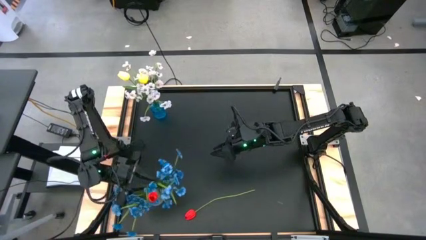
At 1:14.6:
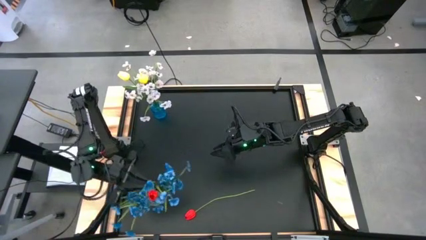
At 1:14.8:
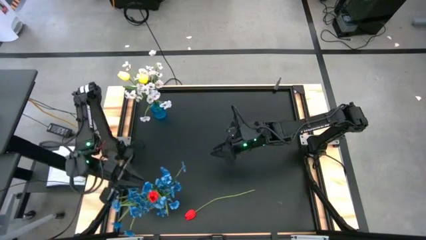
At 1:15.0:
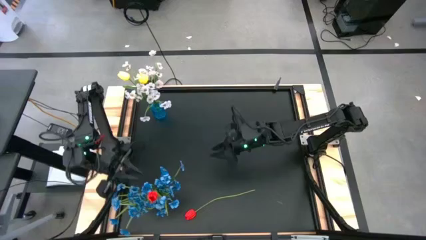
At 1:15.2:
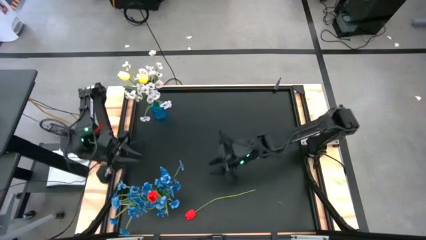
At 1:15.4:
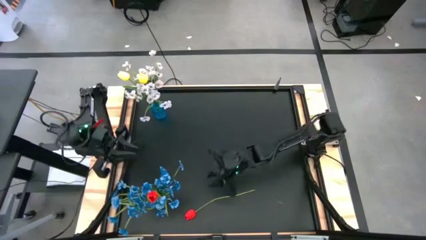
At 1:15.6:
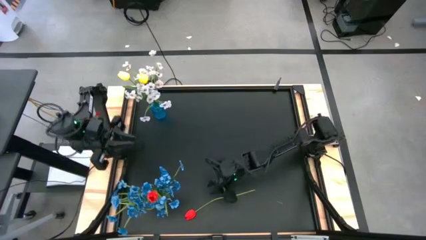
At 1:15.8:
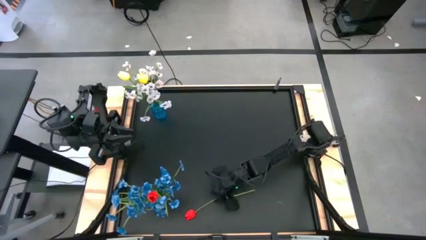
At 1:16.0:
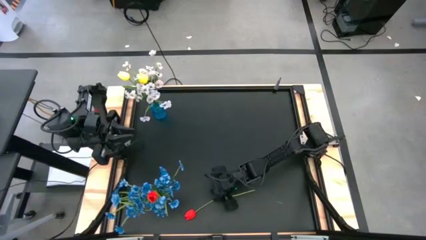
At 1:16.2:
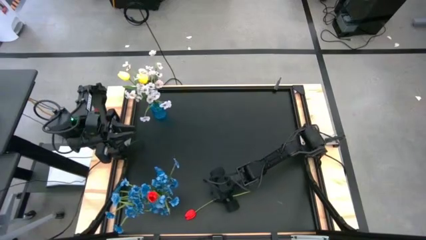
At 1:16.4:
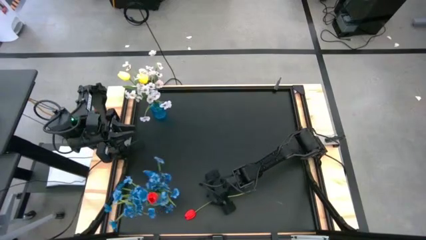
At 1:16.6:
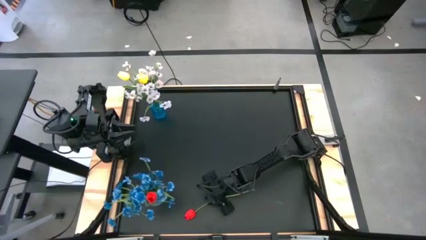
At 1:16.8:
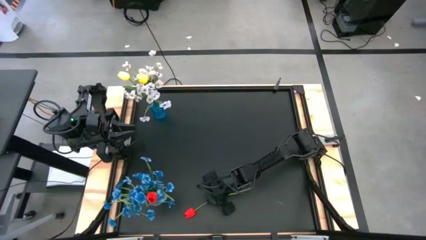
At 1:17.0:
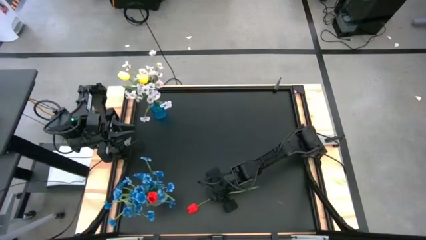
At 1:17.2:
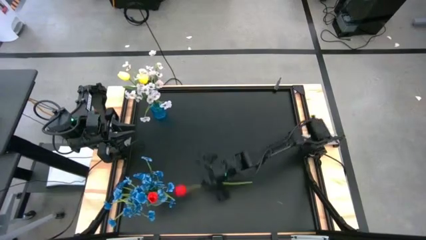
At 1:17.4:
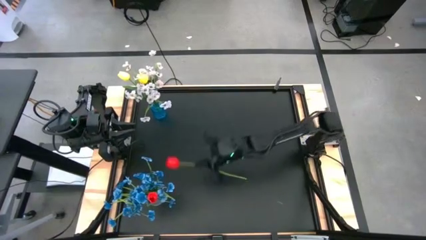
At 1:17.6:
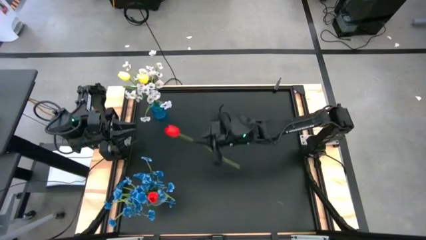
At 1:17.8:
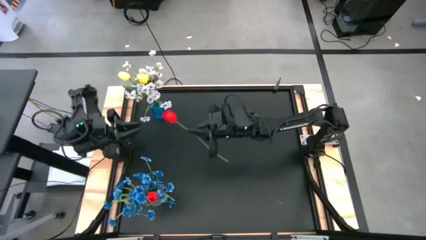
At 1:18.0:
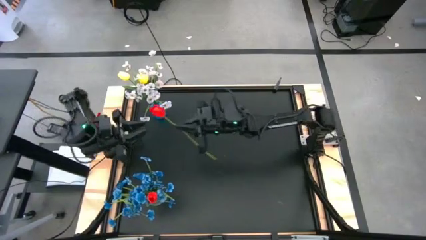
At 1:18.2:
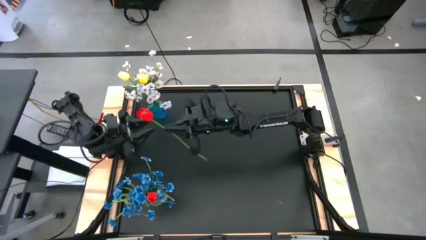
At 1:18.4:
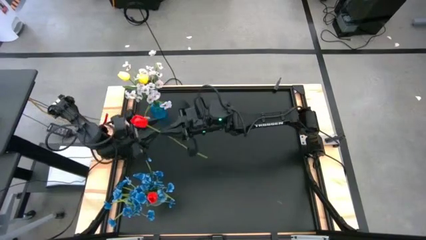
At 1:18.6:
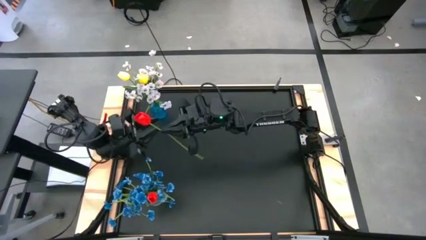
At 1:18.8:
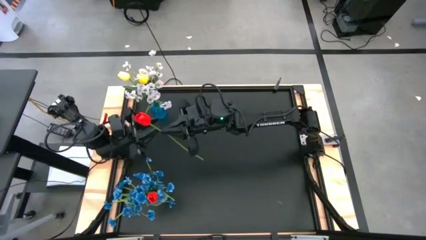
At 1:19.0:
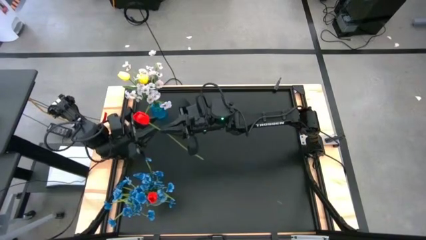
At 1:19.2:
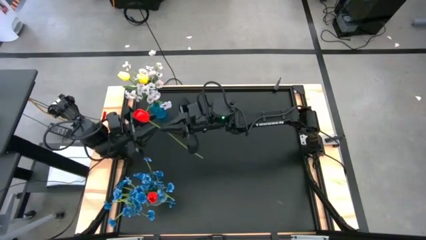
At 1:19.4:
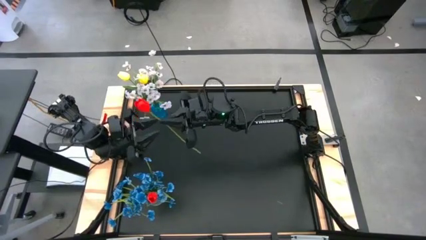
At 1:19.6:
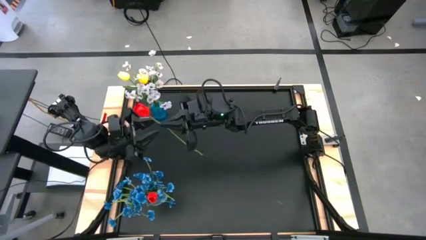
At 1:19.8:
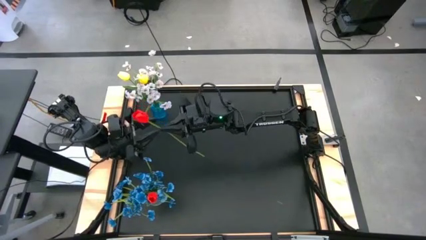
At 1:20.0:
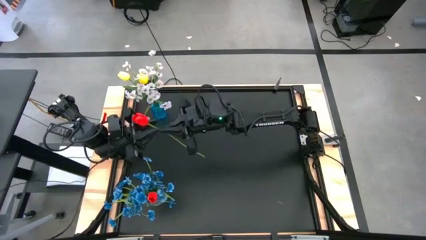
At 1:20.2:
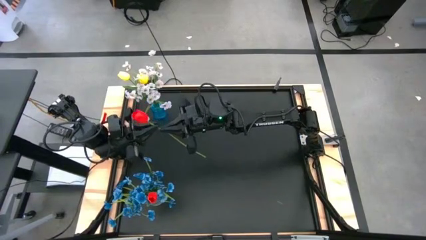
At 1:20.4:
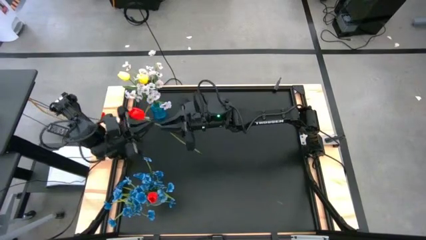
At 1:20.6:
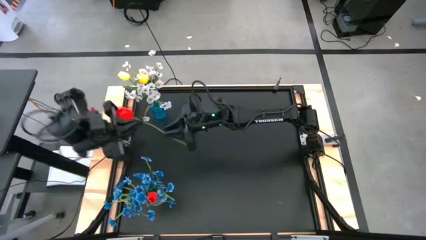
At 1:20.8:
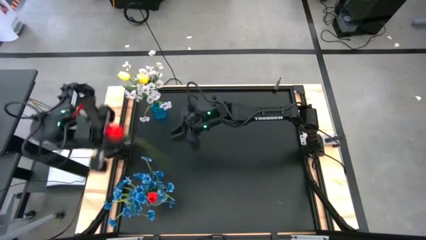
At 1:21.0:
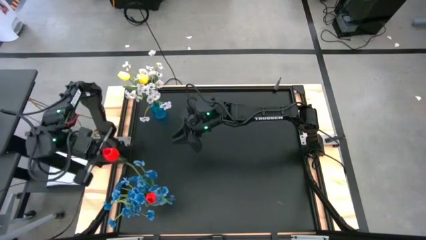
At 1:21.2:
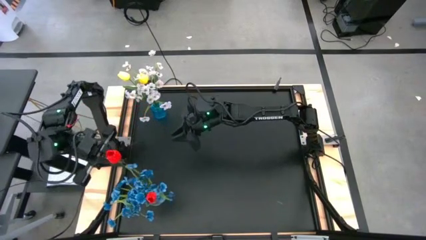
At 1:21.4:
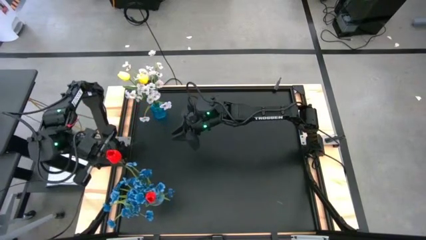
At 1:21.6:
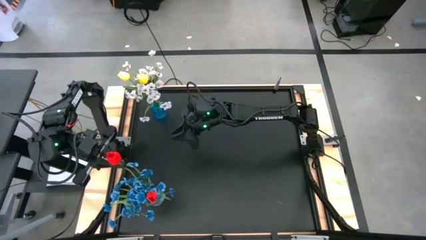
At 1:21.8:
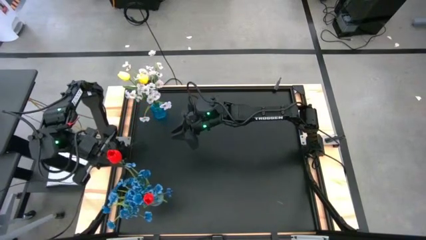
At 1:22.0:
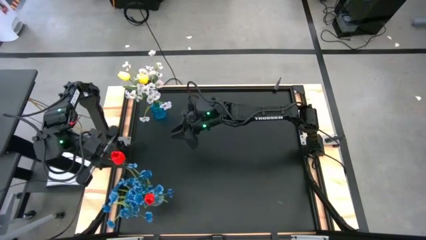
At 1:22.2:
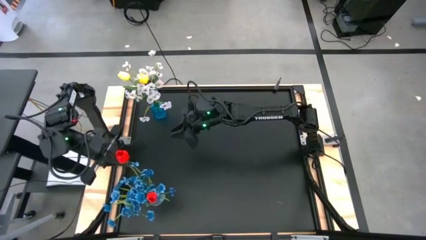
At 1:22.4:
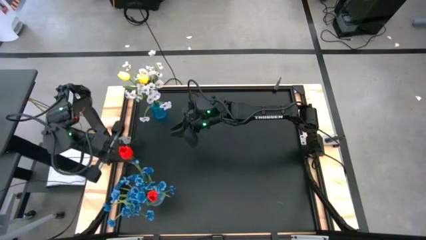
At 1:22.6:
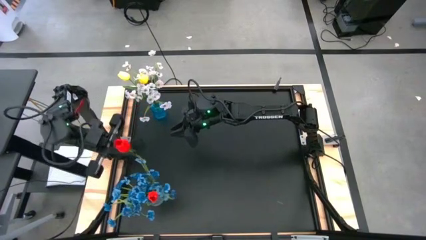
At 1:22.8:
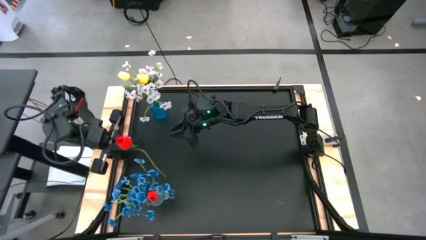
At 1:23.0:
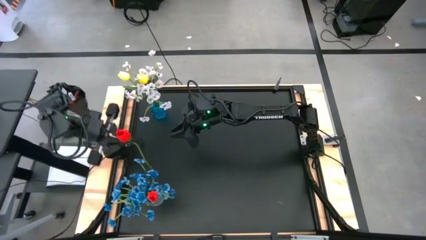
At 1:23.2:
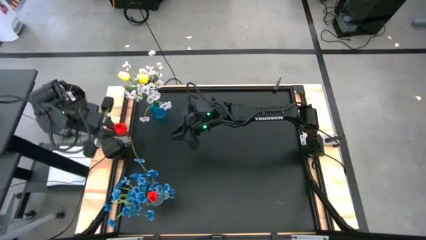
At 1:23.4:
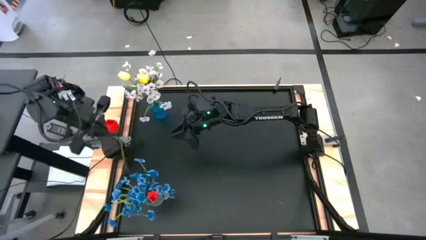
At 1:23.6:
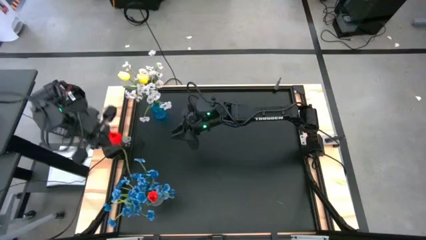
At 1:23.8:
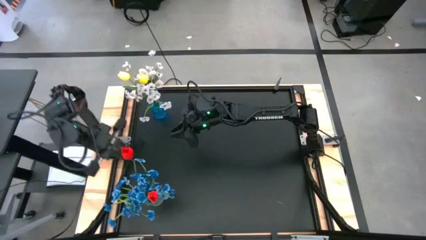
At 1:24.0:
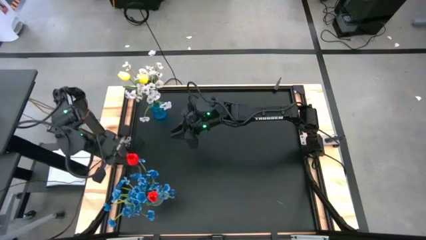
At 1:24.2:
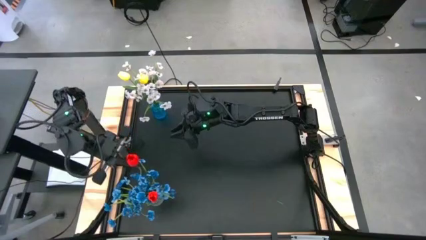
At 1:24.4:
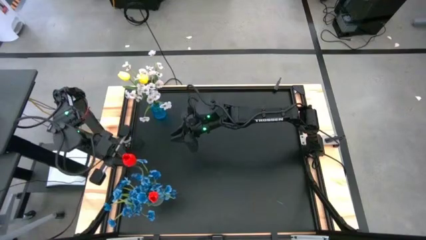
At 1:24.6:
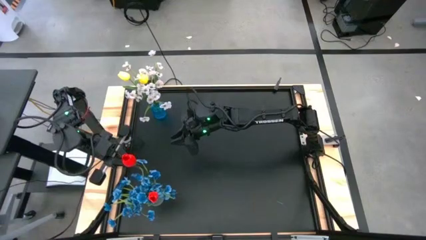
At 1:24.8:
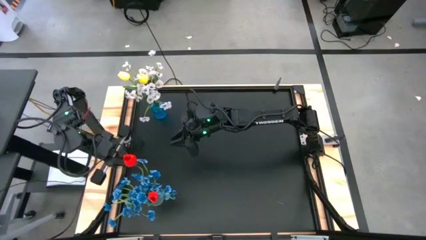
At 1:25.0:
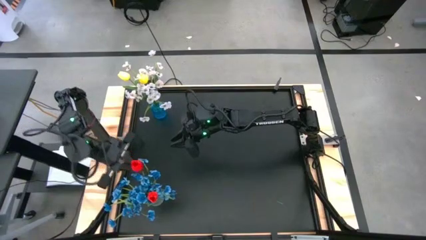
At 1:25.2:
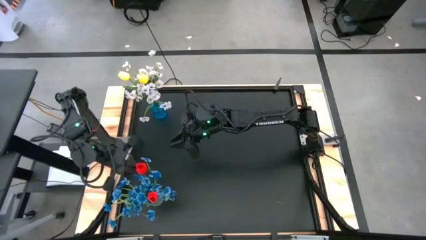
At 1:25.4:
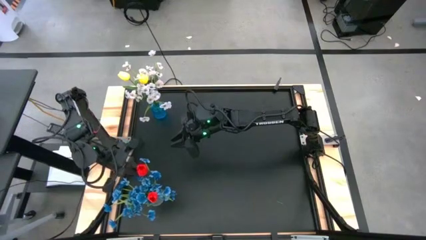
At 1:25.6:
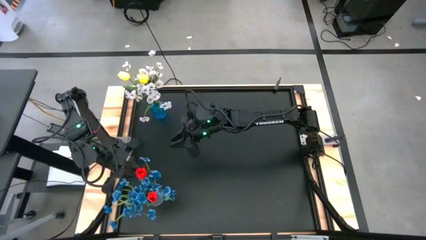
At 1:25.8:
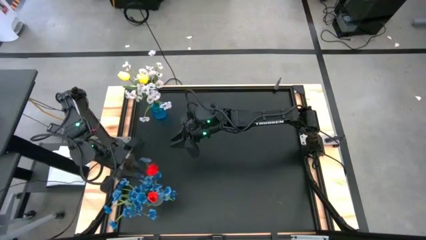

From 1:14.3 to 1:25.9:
Task: Sort flowers into vase by color
Put the red flower into the transparent vase
